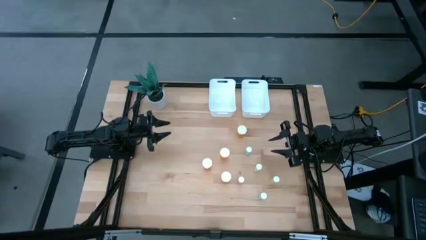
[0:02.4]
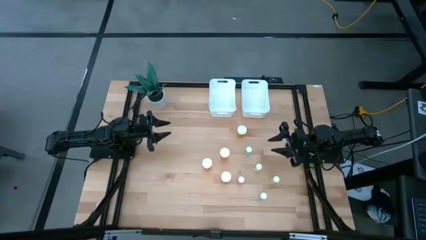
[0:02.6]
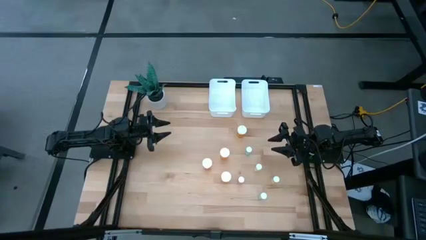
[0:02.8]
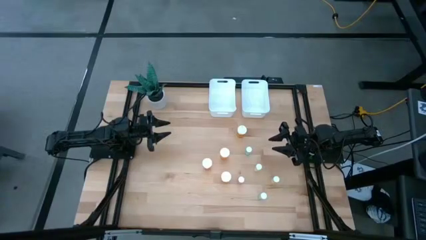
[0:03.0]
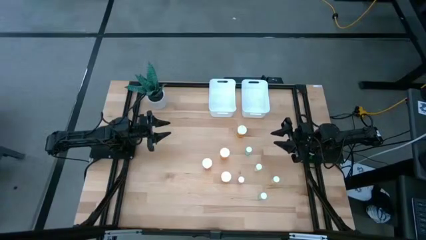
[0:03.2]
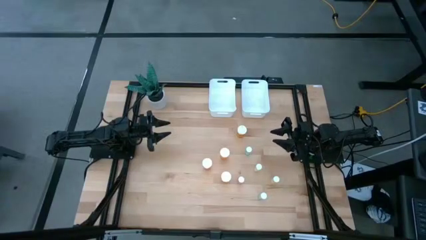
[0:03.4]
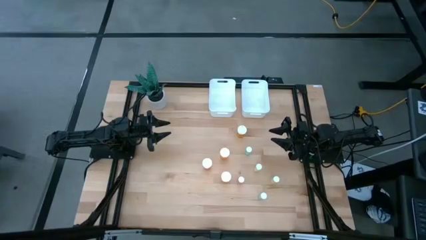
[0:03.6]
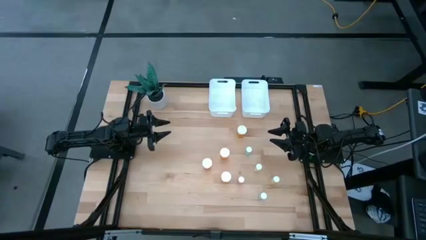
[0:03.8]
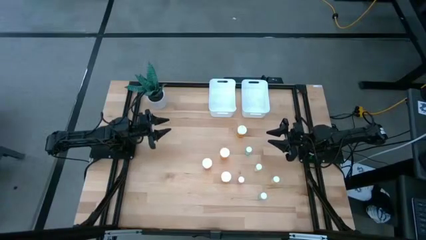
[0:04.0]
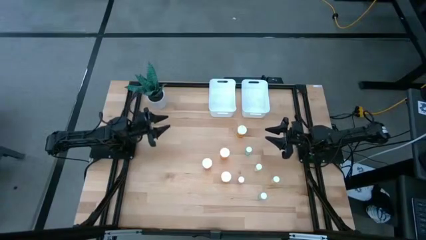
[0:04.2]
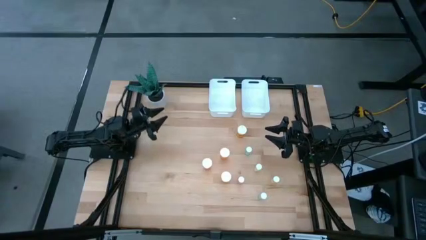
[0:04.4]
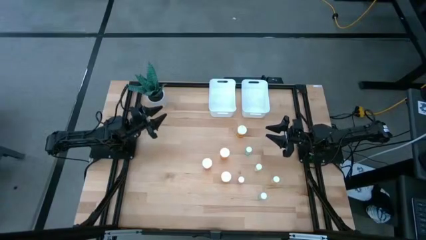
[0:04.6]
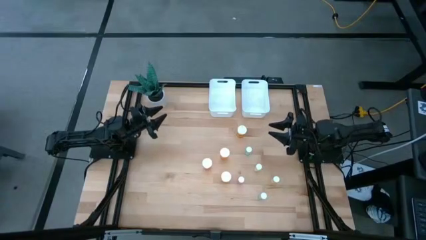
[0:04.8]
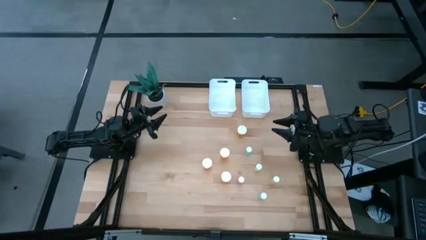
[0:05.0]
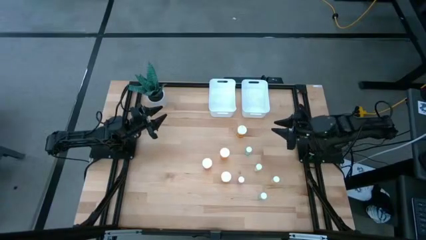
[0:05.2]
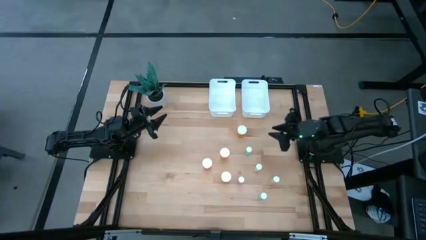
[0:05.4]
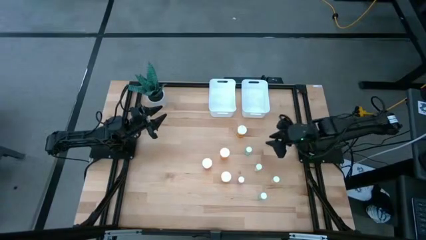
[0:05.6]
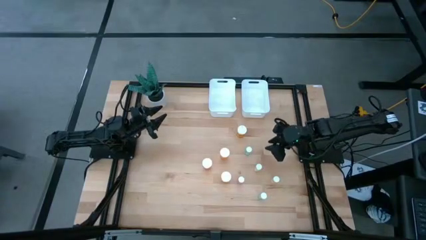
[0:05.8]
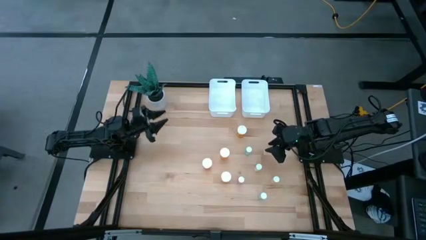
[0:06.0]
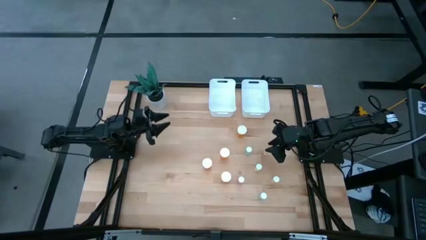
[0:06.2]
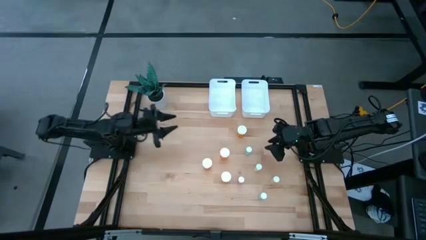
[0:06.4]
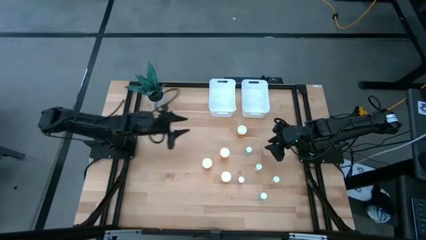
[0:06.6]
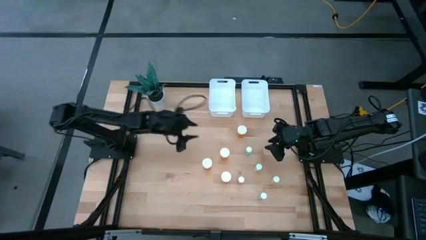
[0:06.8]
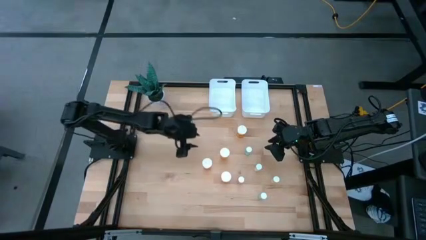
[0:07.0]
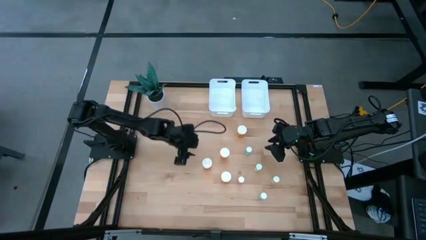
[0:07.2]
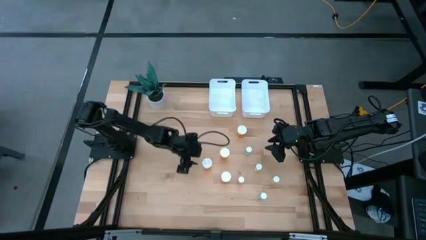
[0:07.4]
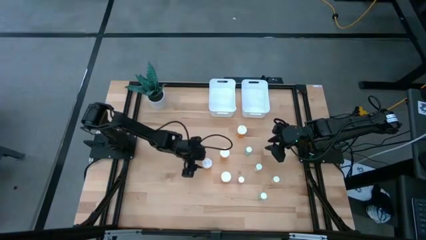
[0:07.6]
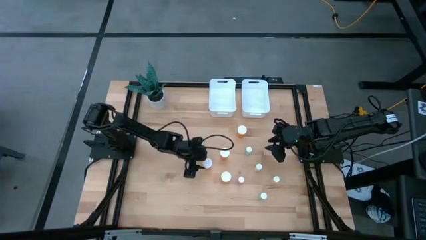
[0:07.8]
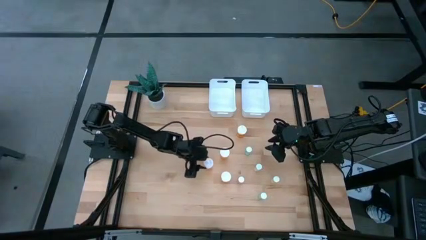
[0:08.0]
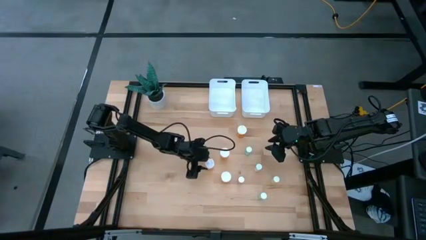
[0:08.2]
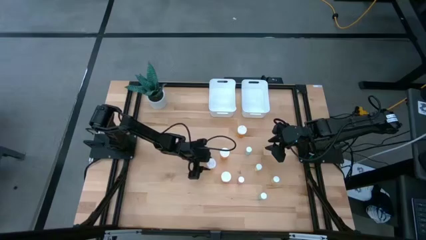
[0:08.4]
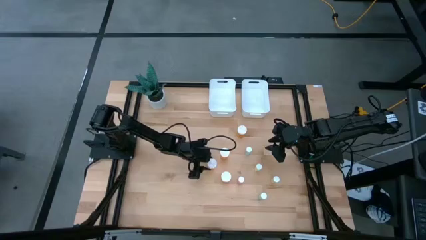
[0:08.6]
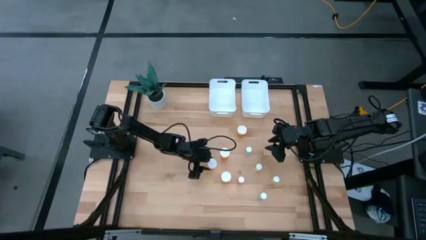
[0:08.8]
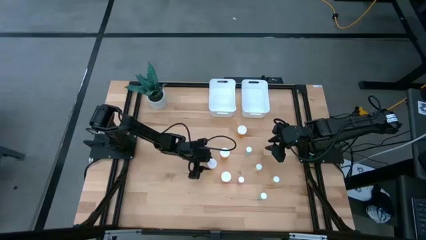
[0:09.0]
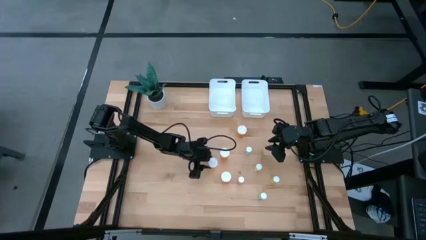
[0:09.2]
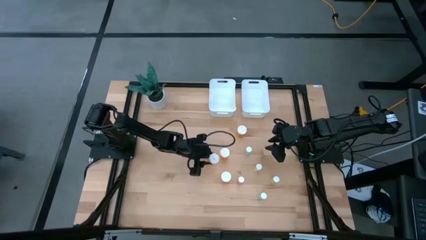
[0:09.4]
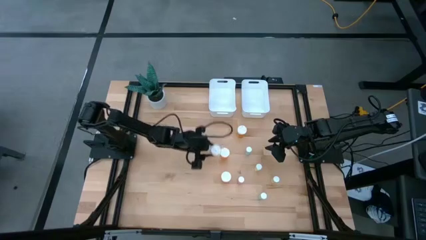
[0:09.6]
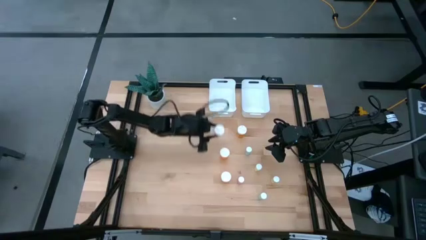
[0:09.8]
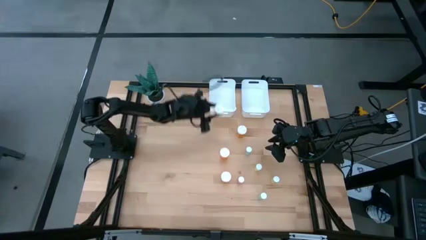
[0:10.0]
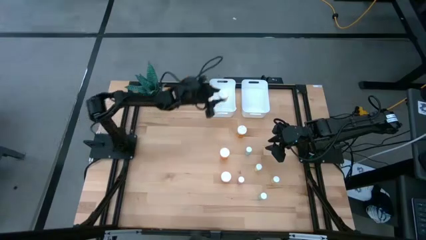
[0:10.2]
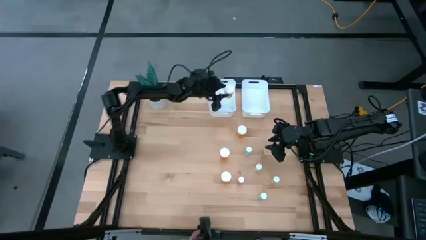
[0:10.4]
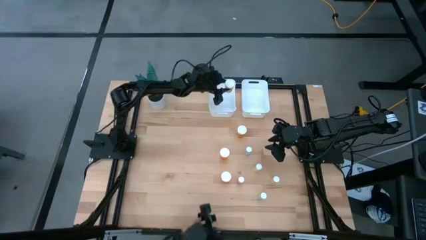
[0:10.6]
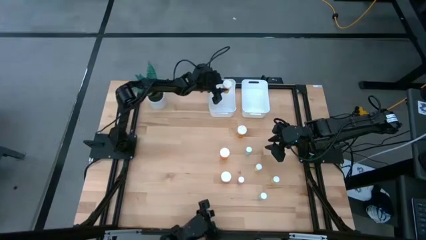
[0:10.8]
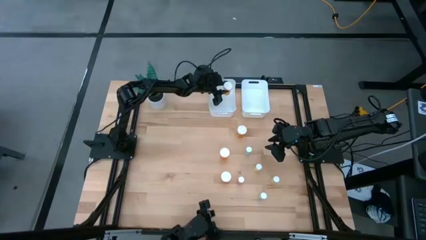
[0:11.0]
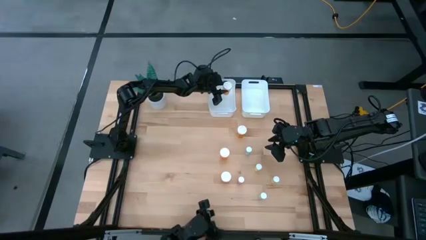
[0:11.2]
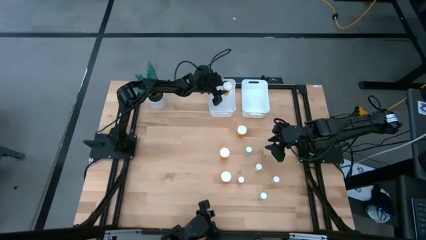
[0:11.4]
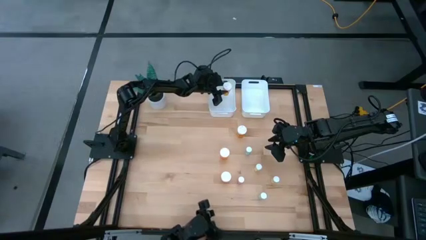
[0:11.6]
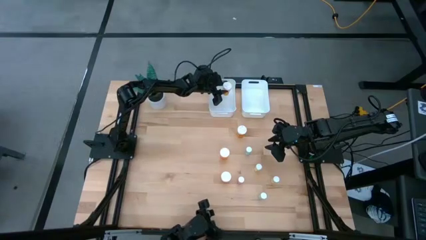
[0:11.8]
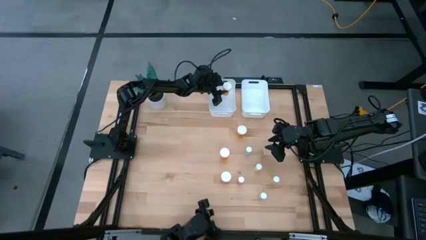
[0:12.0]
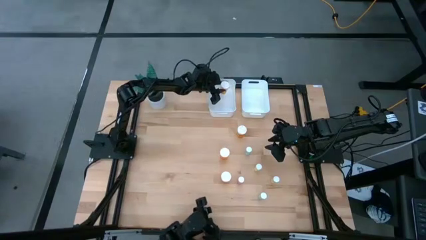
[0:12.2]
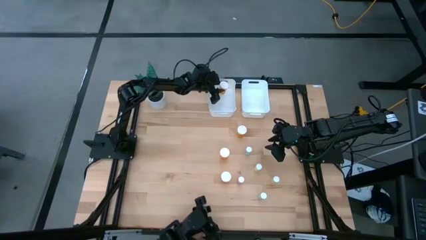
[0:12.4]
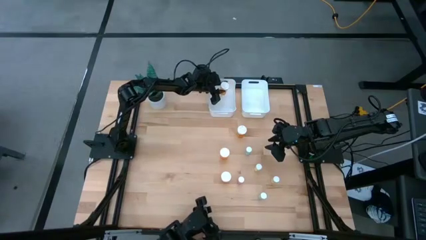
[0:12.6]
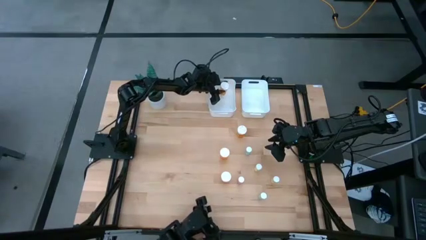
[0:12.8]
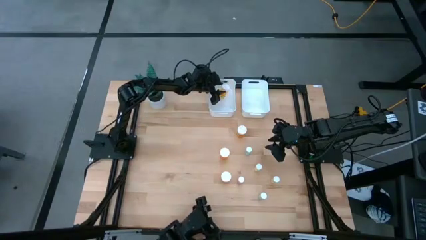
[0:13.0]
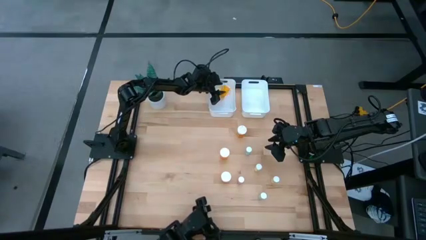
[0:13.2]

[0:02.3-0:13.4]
Task: Pick and place medicine bottles into bin by pill shape (circle, oval)
Put the big orange capsule bottle into the left white bin
